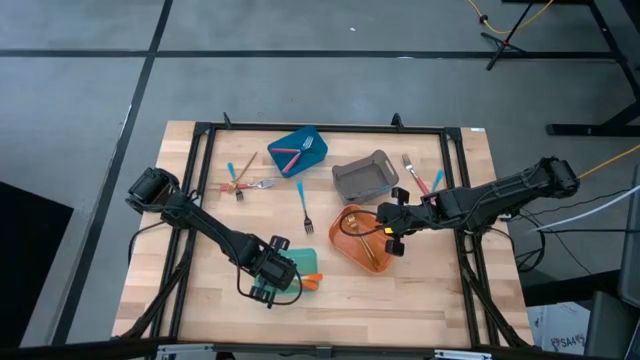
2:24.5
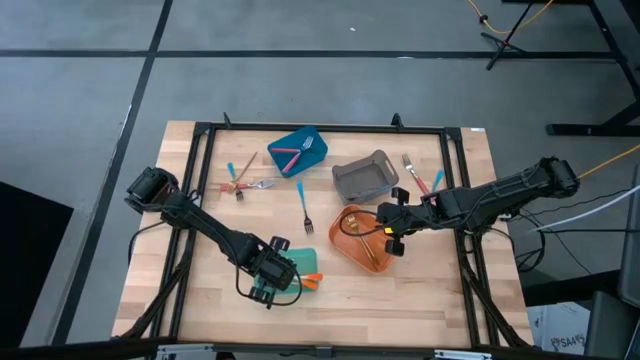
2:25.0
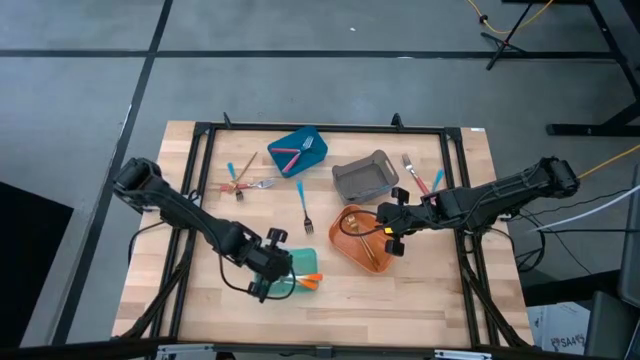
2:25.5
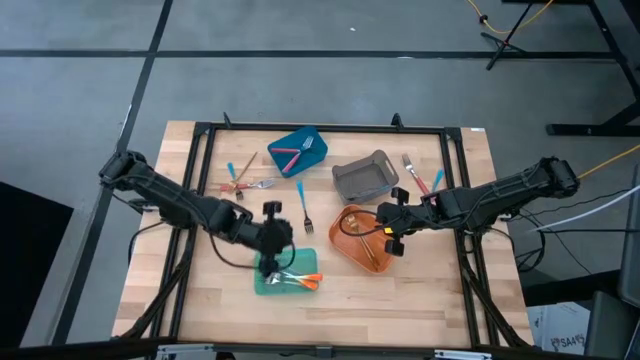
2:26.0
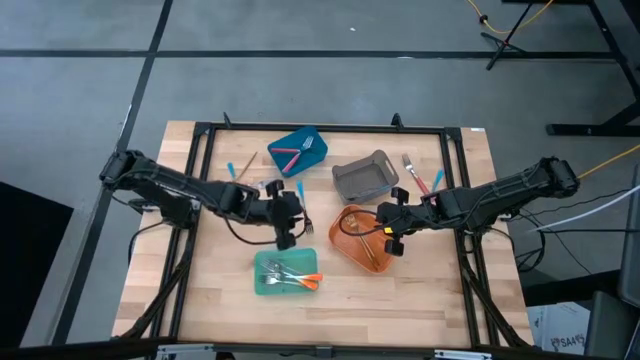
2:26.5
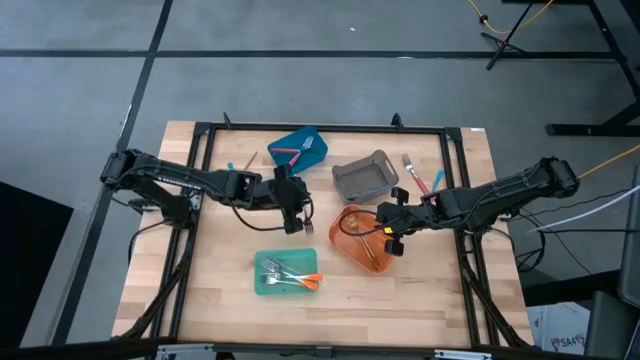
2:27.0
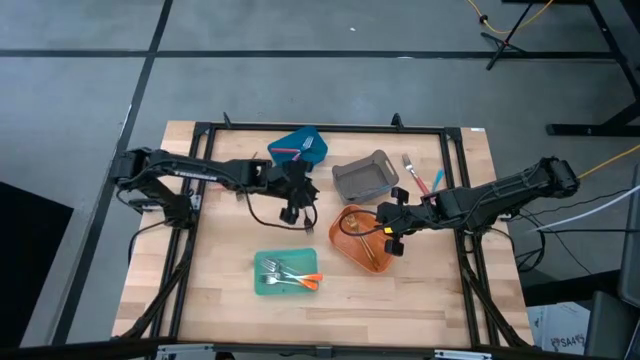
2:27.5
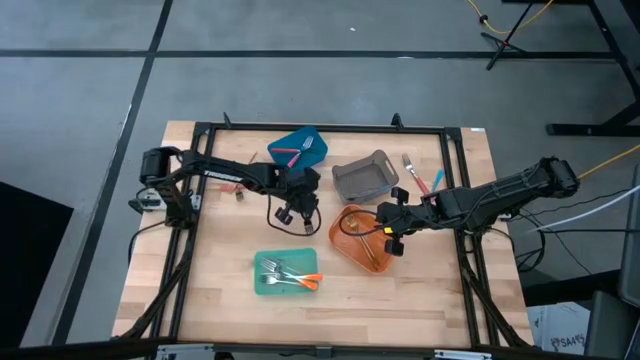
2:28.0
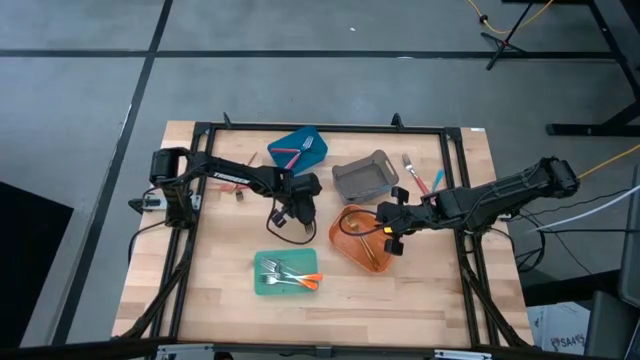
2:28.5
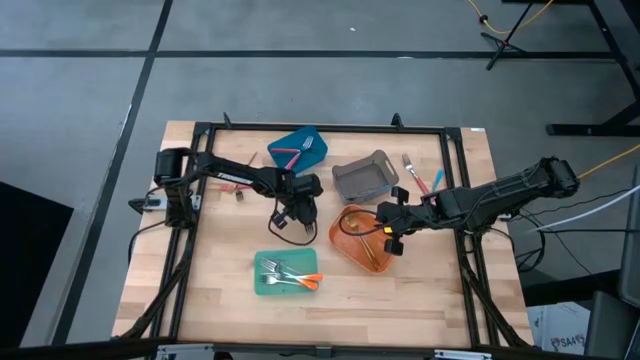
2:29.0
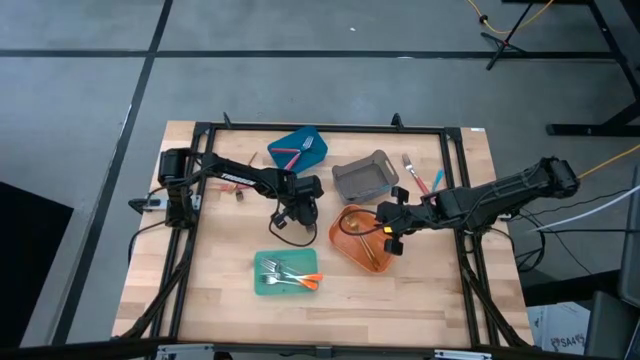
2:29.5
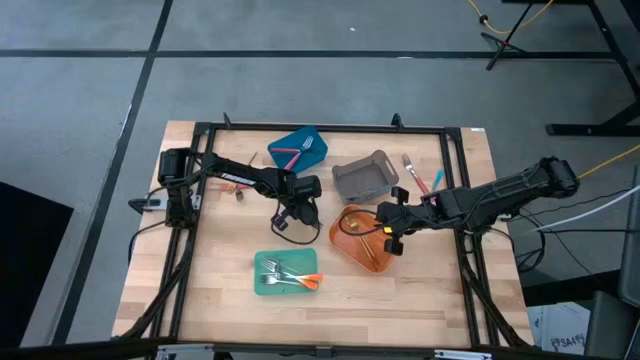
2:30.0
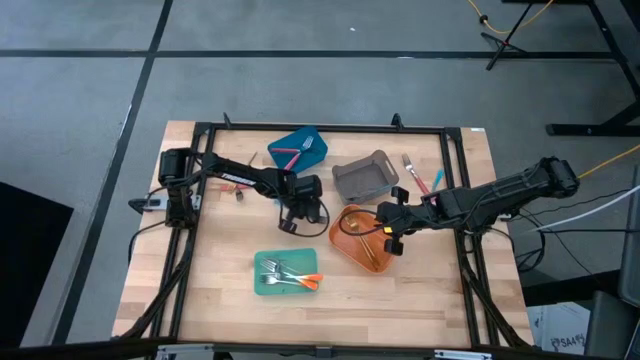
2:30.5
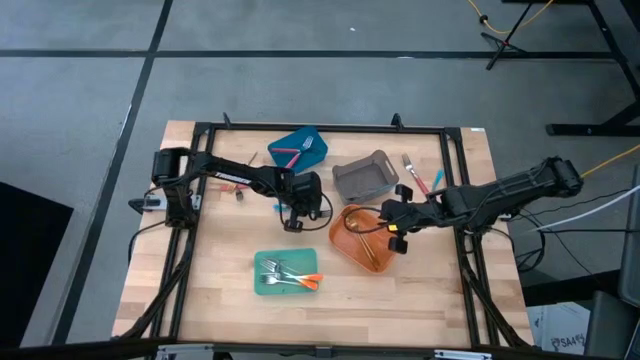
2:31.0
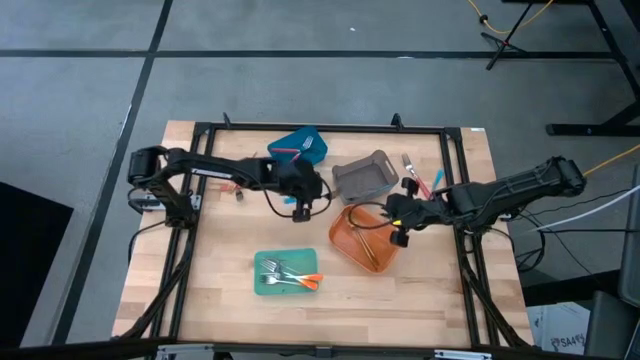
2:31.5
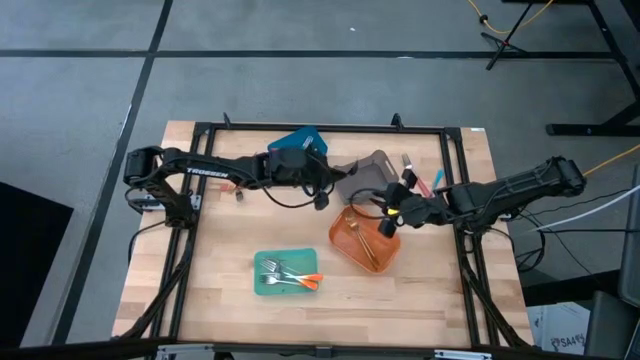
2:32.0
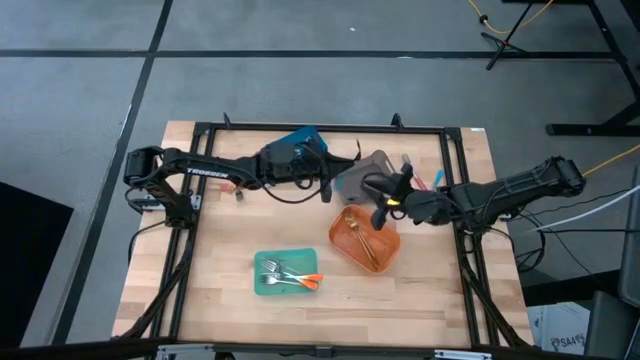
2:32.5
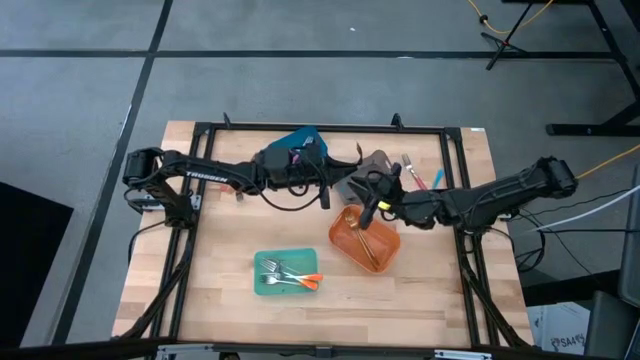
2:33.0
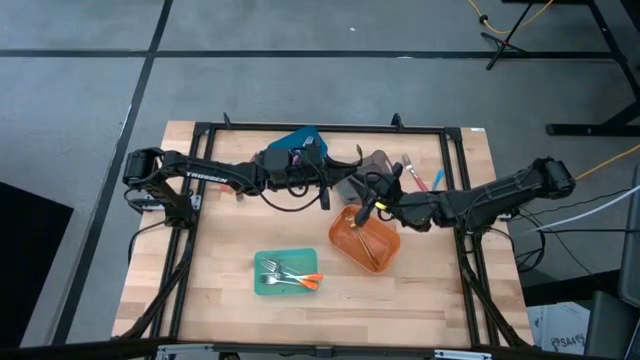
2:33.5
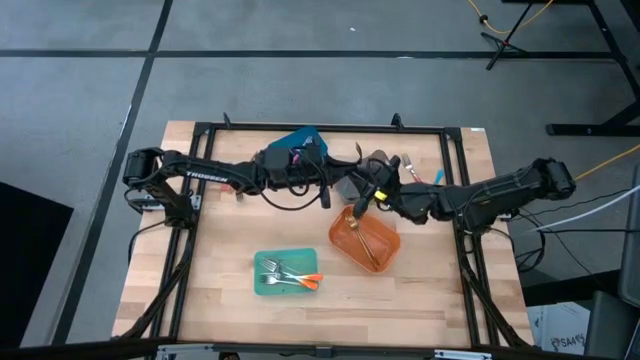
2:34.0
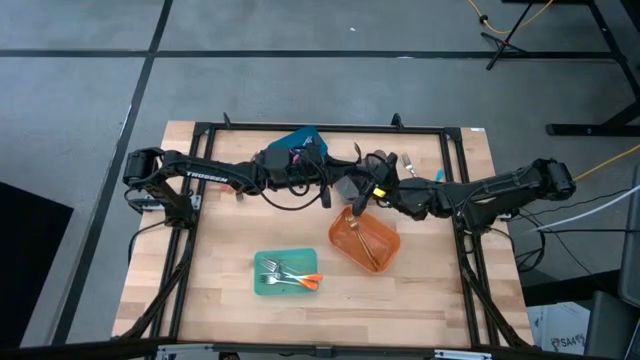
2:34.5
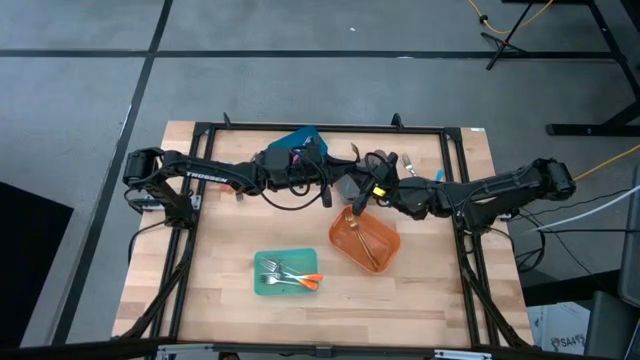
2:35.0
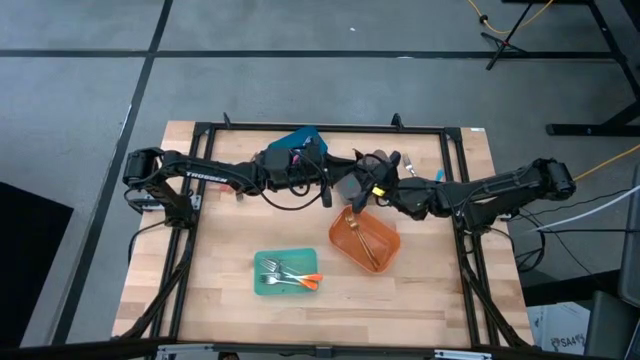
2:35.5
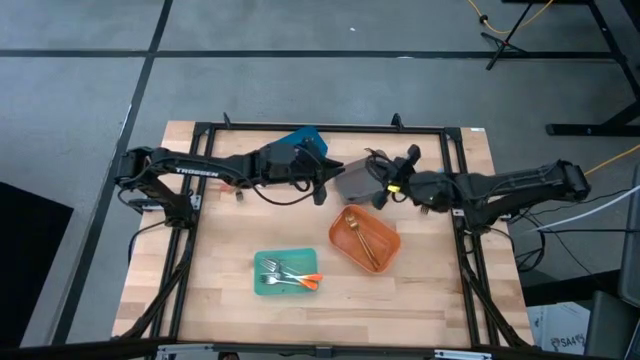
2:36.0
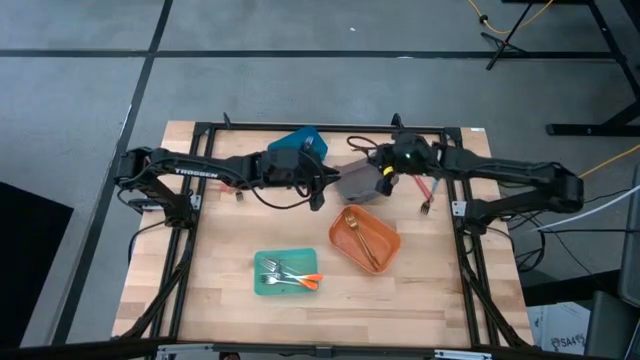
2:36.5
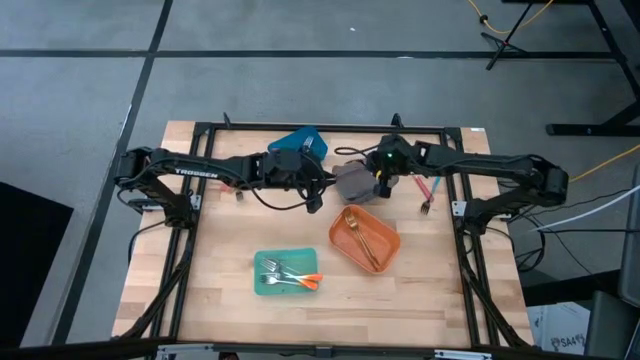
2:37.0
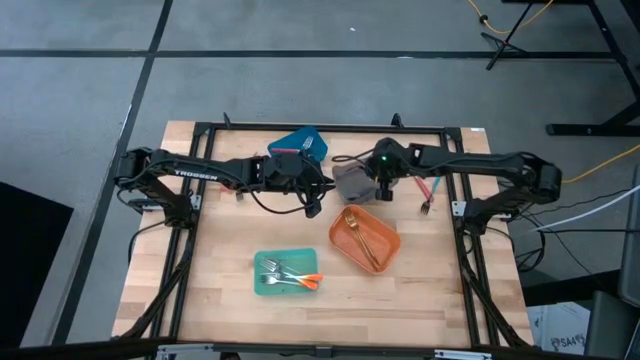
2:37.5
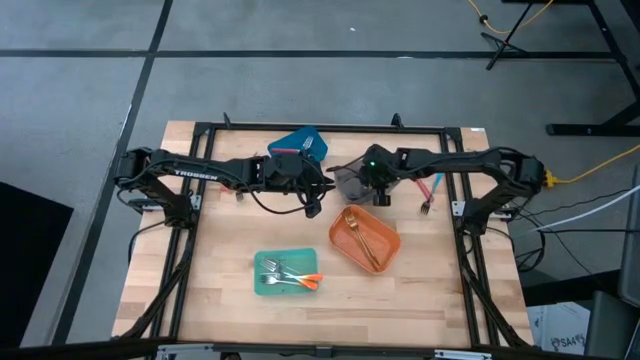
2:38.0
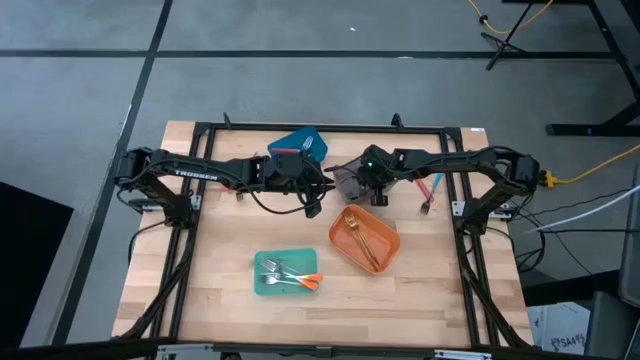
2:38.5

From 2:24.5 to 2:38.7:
Task: Sort silverware by color (type)
Put the blue fork into the black bin

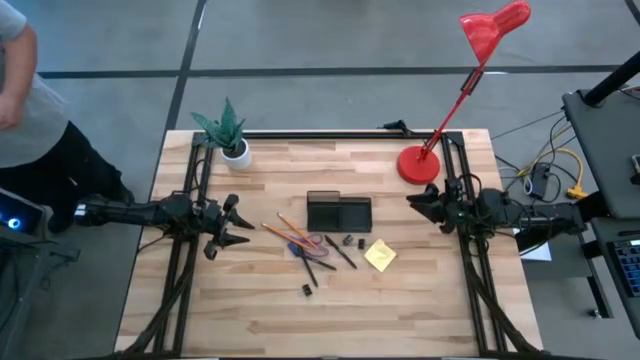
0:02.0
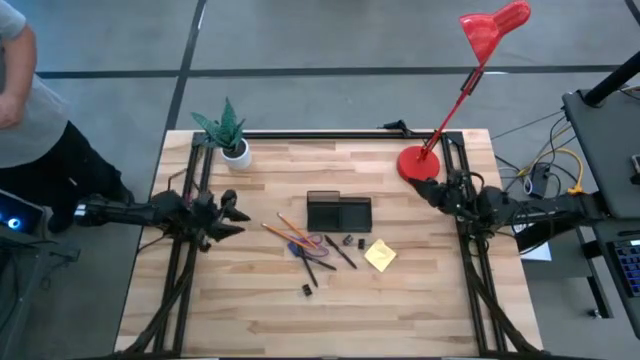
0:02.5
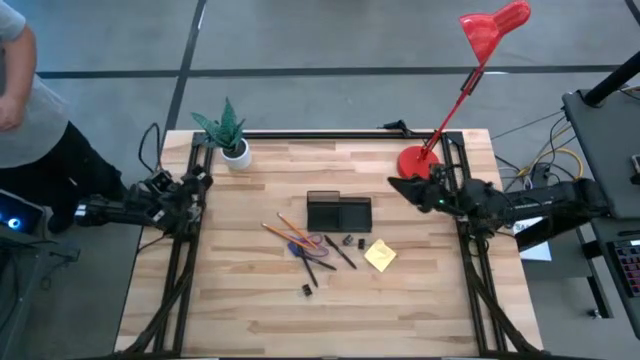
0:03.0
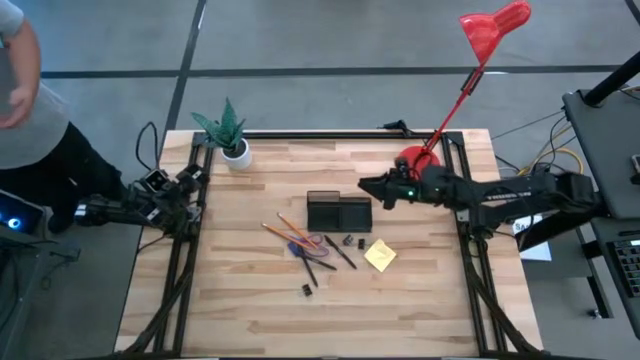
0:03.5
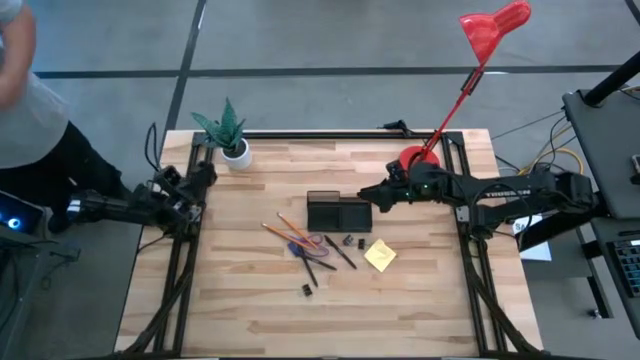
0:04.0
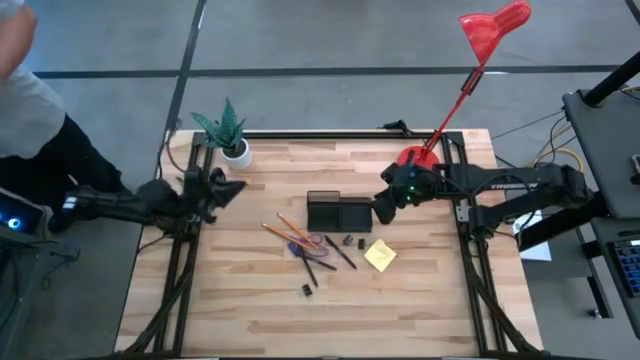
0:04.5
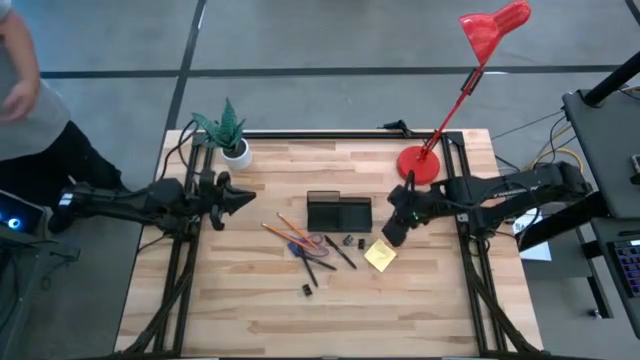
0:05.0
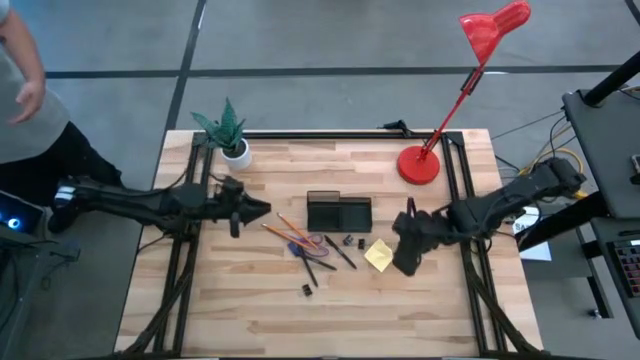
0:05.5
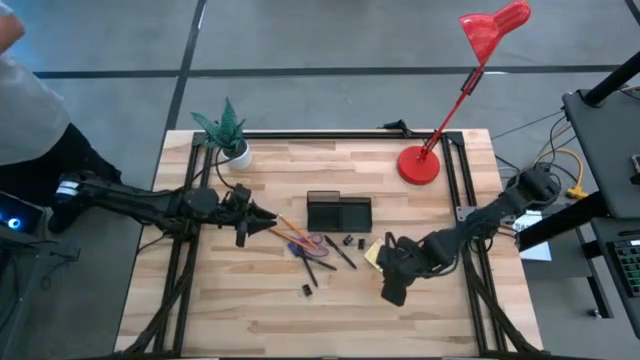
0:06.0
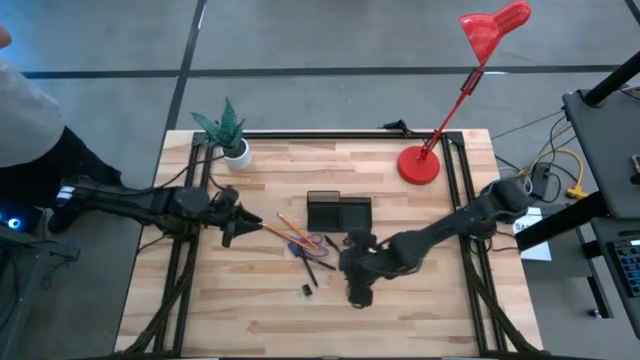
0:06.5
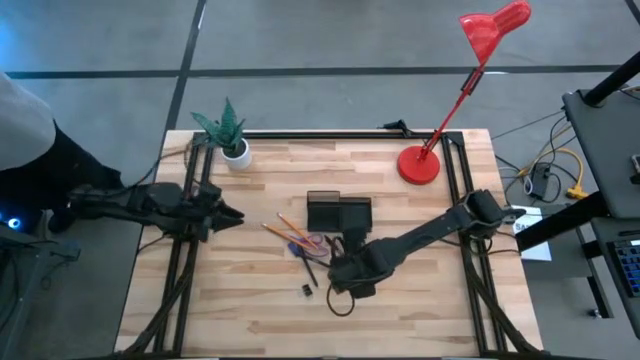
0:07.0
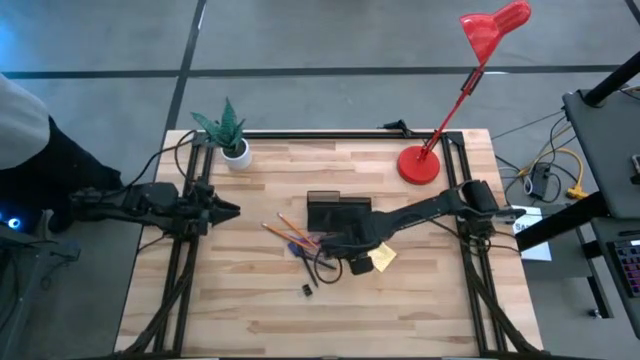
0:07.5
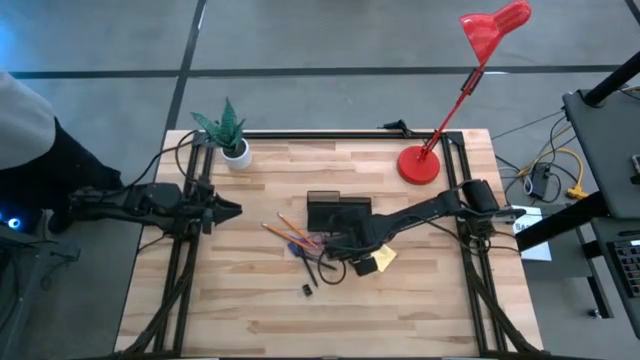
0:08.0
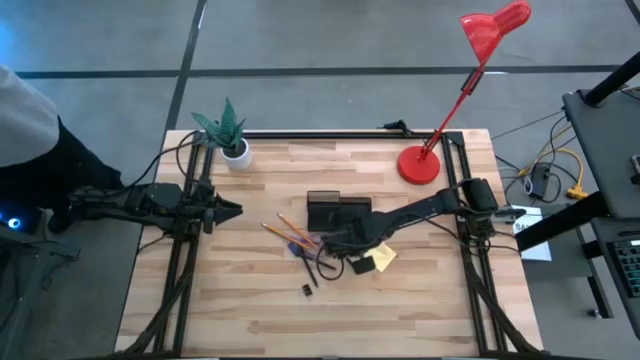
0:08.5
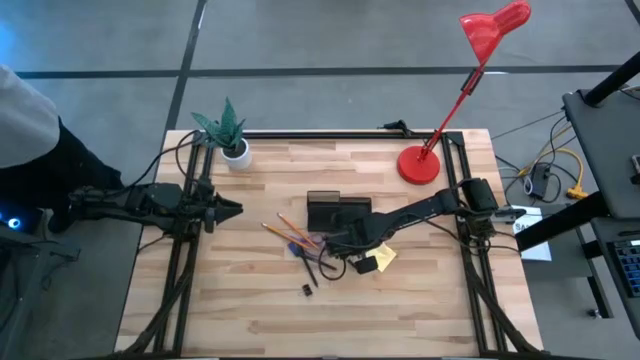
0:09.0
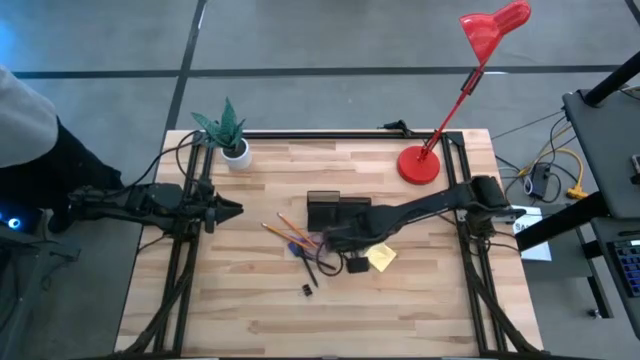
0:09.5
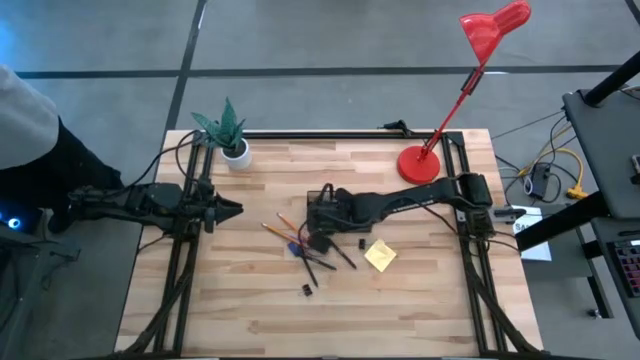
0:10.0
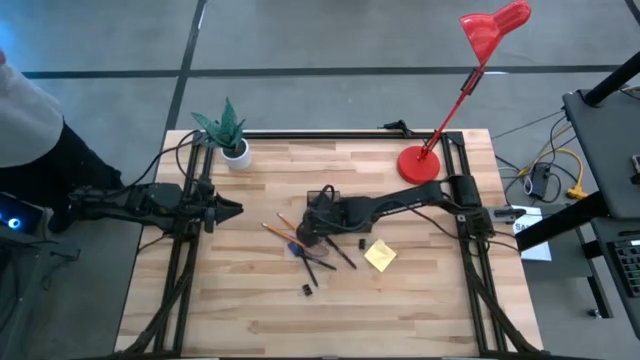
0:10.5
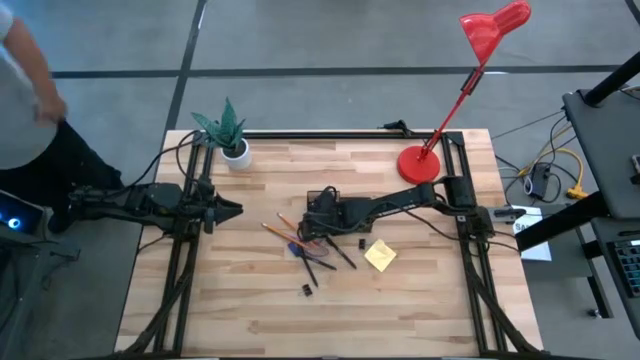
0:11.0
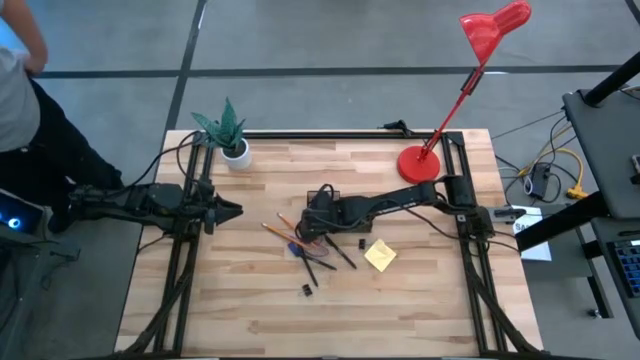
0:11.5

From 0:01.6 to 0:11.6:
Task: Pick and place office supplies into organizer
Put the top left black binder clip into the desk organizer
